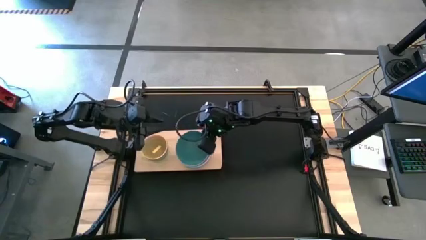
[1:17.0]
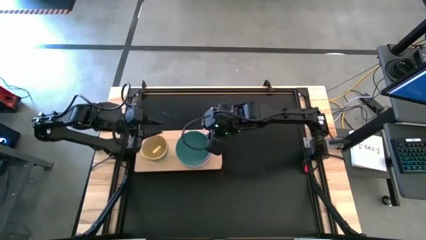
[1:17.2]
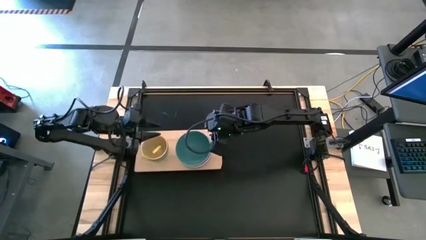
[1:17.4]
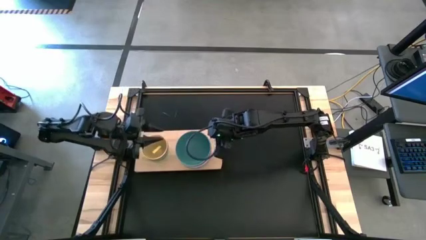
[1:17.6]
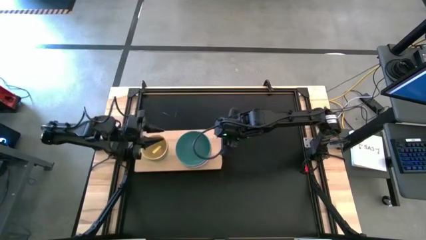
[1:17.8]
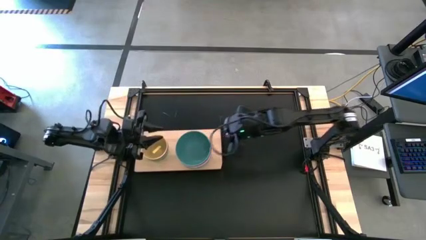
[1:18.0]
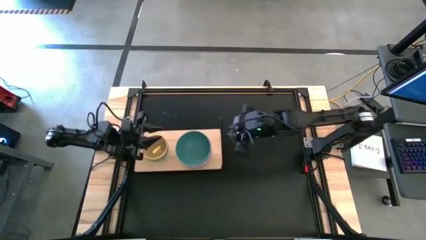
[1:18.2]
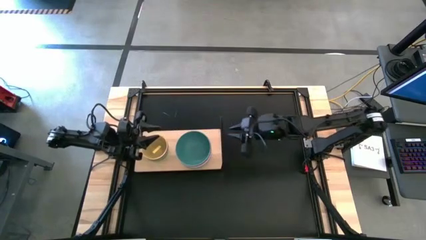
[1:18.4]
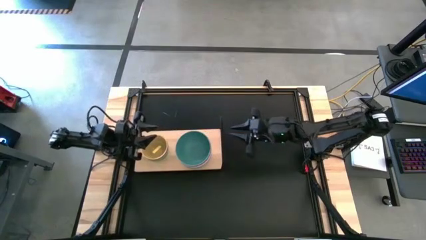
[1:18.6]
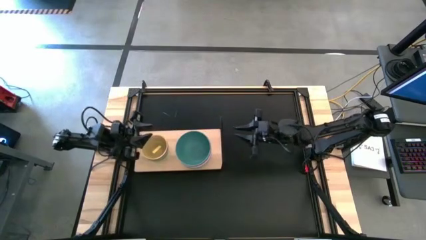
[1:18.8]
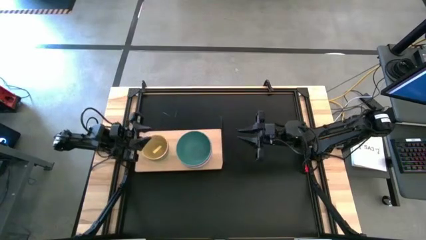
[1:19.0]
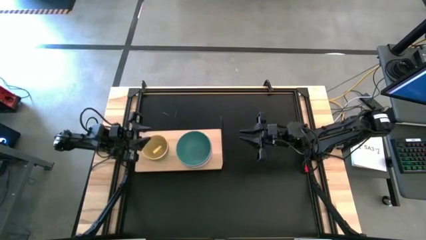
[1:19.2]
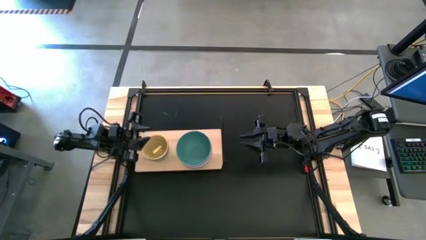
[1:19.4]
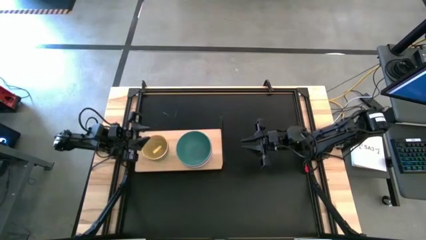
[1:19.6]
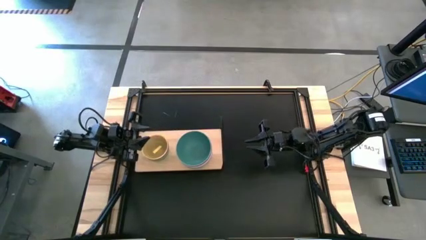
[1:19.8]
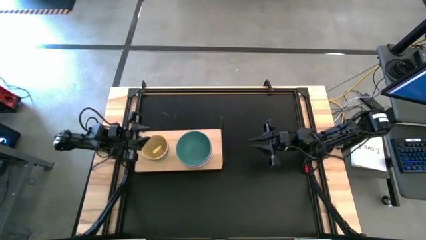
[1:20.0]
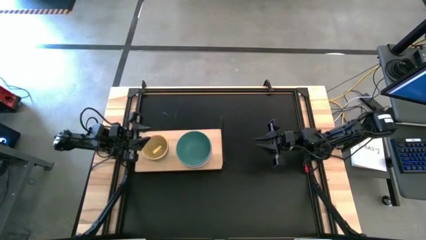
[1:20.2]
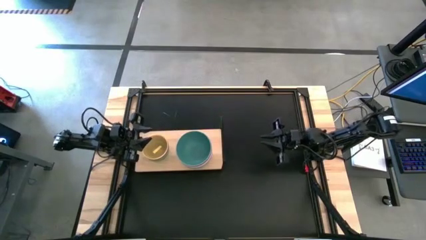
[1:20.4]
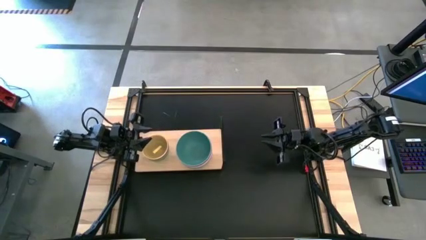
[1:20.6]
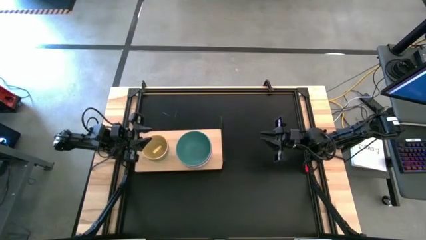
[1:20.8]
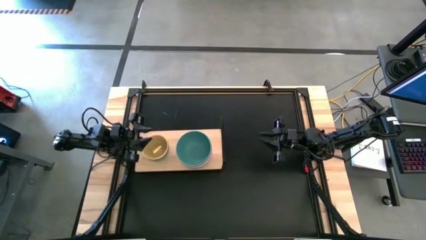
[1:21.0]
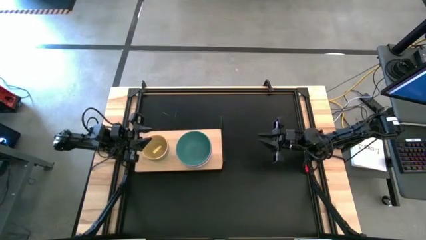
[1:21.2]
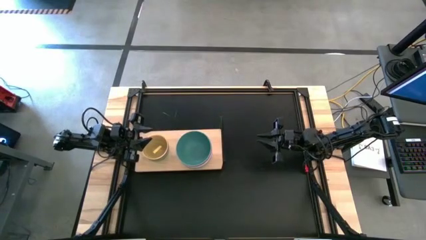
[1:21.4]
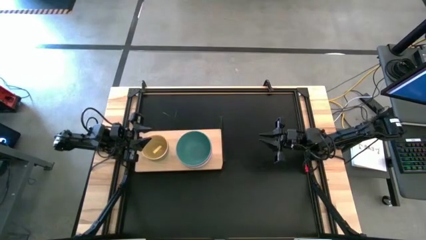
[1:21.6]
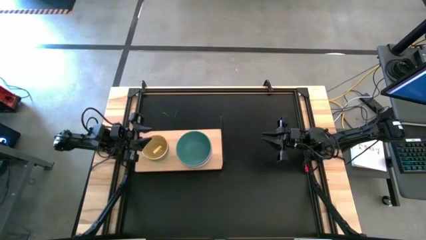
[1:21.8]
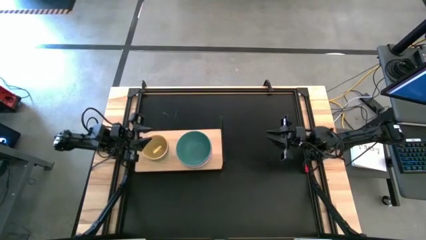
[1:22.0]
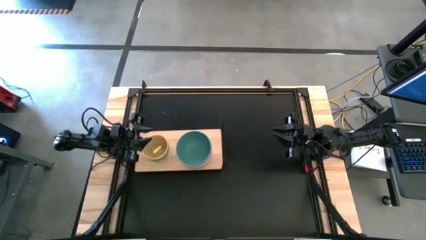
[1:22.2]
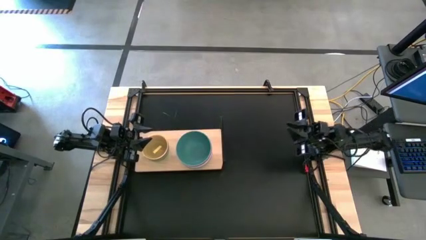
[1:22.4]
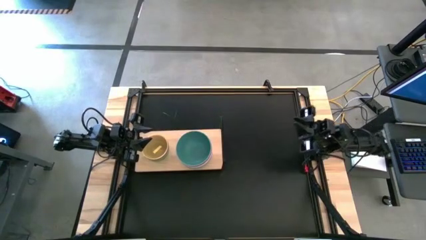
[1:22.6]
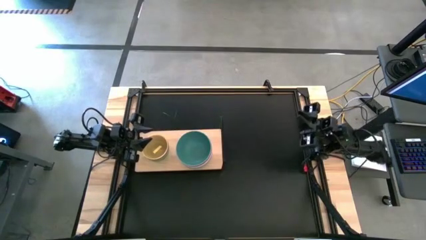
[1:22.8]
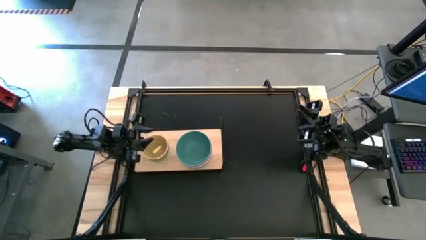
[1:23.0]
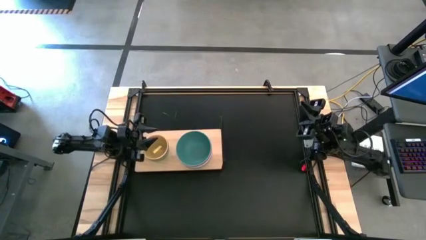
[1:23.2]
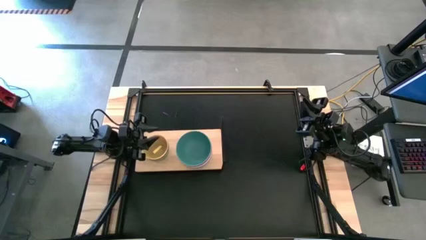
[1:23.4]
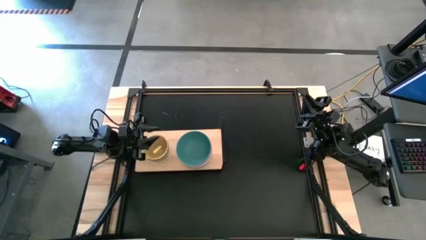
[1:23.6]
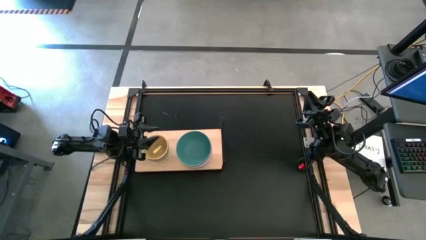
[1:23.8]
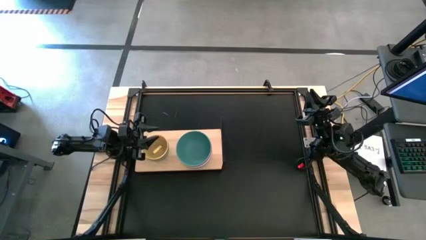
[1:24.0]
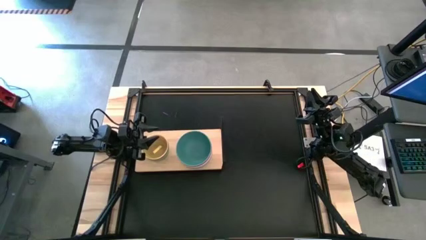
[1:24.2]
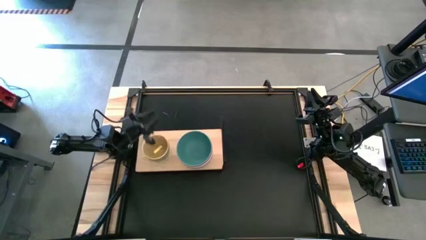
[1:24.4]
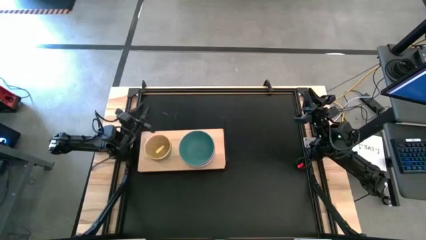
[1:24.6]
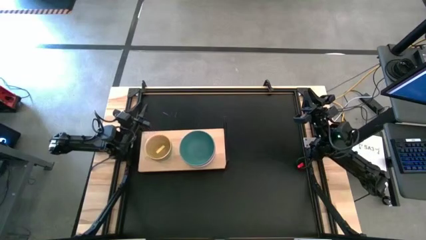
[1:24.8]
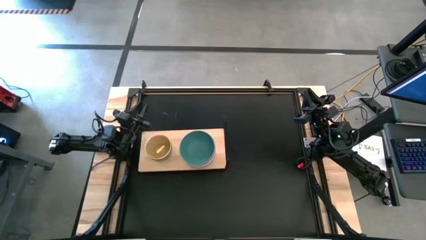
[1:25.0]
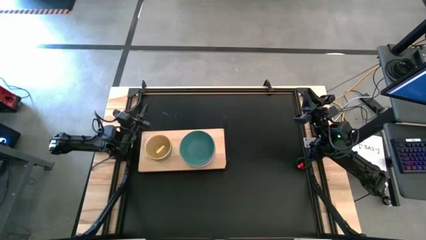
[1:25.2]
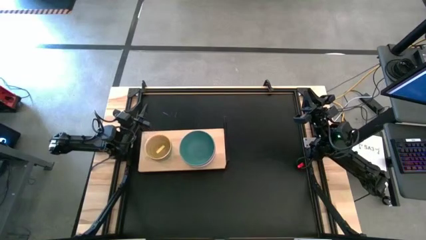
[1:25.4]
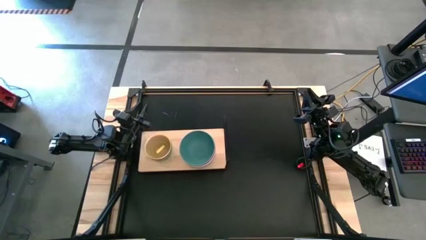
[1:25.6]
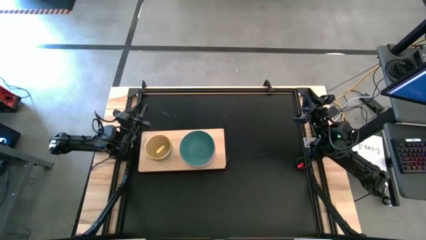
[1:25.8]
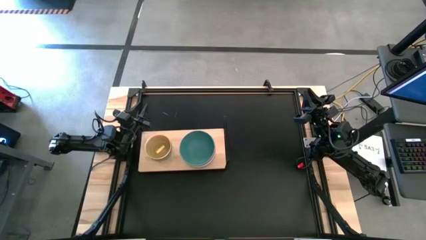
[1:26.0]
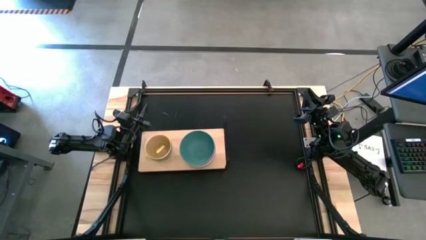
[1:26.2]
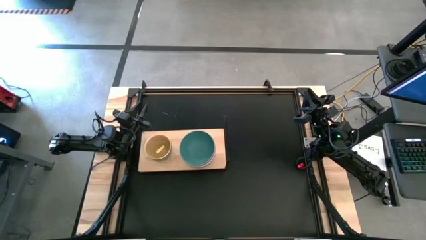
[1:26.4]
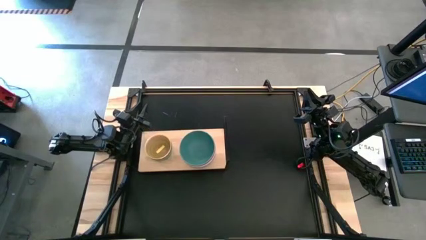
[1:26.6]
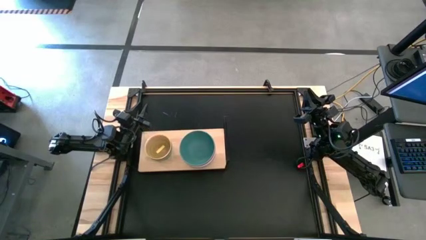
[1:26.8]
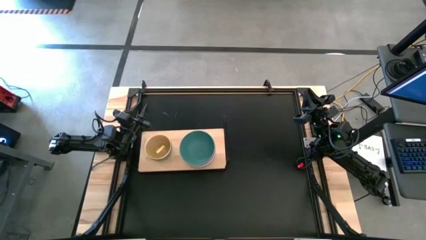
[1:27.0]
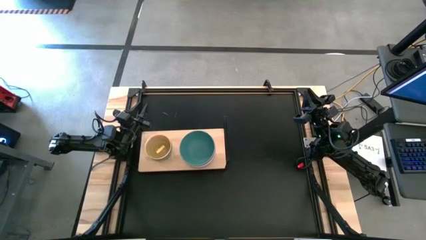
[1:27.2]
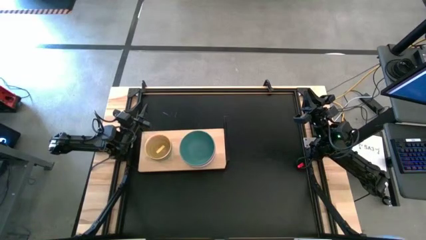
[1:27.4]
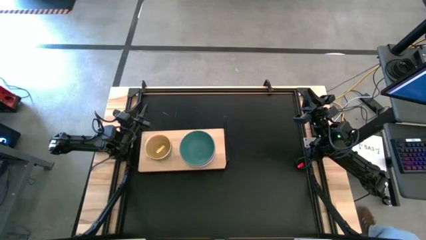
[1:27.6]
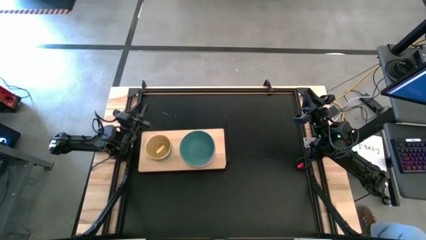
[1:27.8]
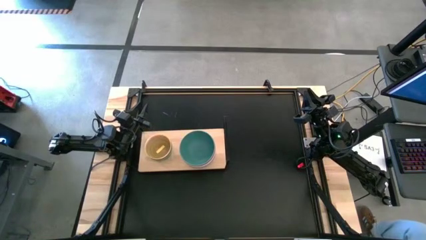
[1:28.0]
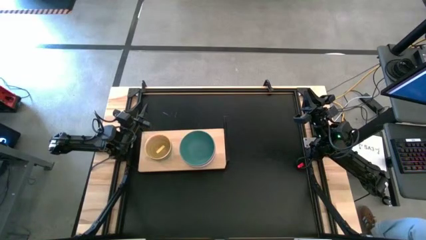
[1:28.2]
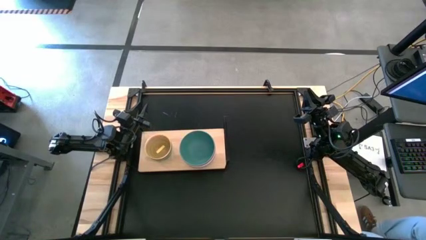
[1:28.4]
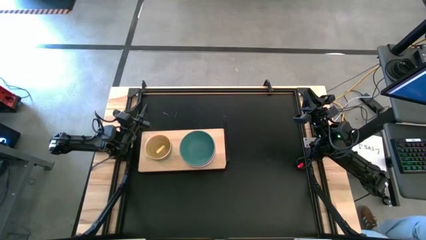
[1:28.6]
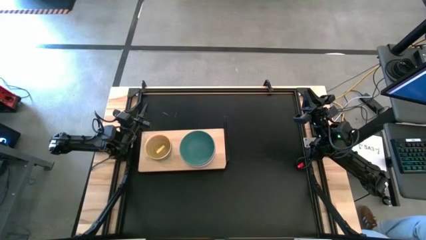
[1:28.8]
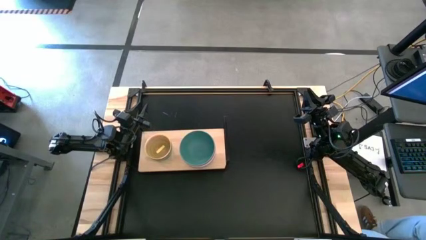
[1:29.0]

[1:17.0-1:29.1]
Task: Place and stack bowls onto a shelf
Return to Home Position

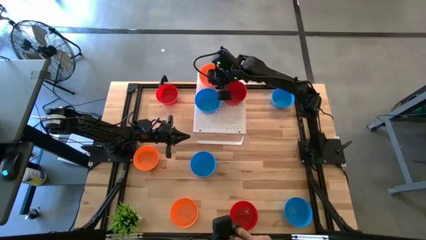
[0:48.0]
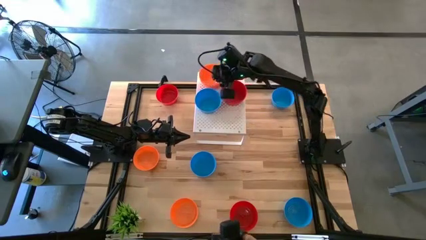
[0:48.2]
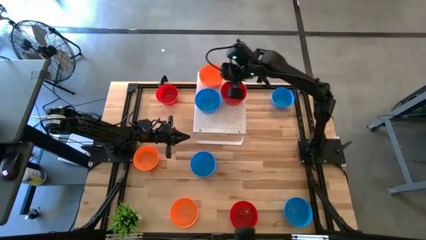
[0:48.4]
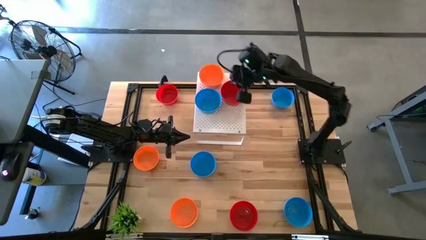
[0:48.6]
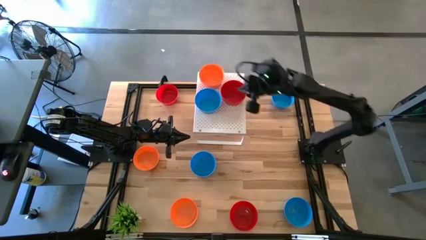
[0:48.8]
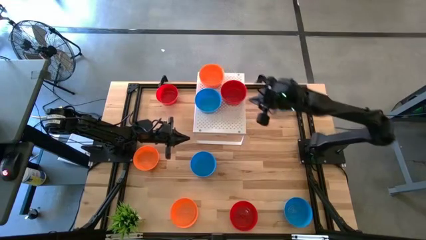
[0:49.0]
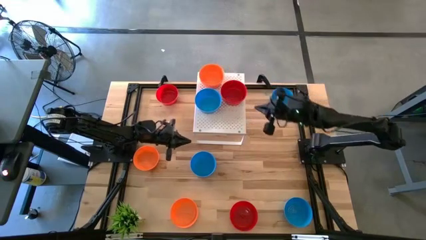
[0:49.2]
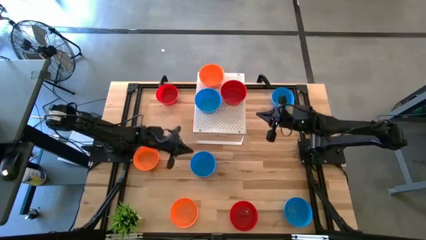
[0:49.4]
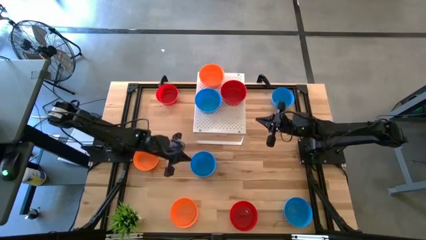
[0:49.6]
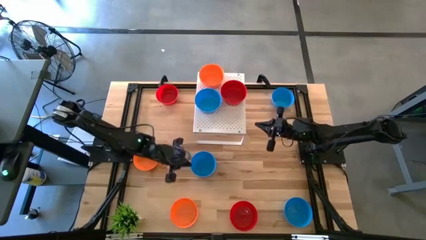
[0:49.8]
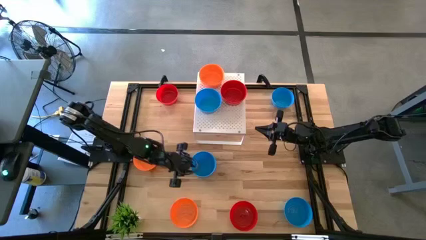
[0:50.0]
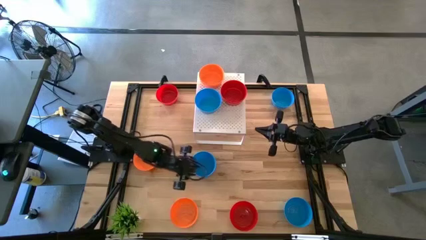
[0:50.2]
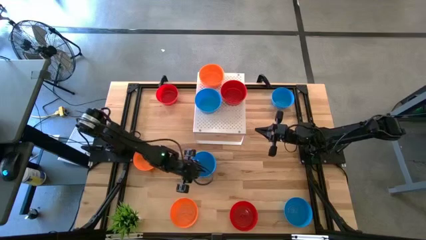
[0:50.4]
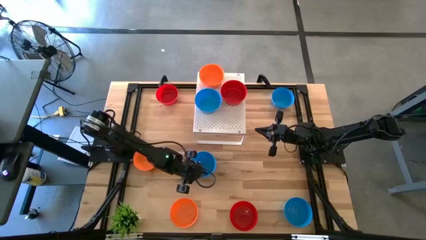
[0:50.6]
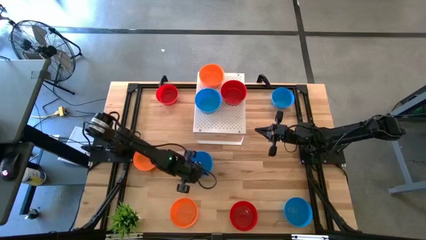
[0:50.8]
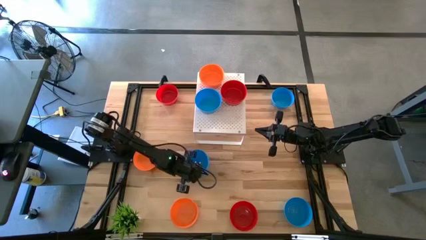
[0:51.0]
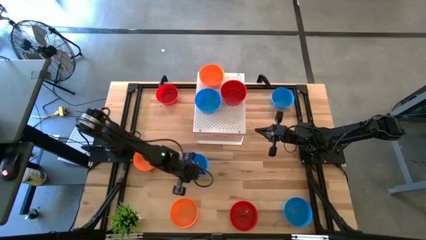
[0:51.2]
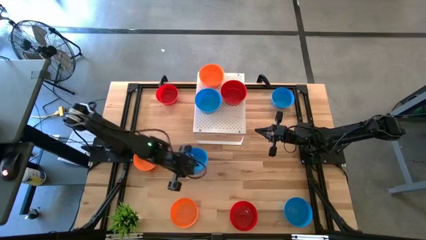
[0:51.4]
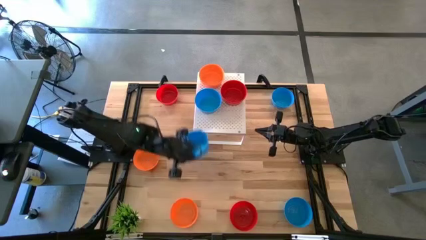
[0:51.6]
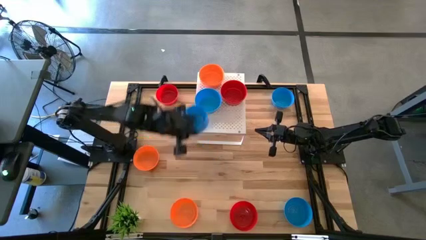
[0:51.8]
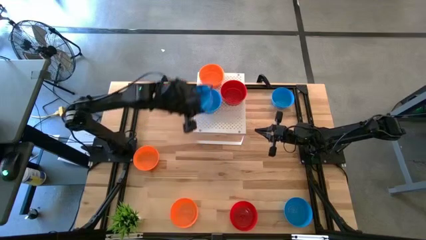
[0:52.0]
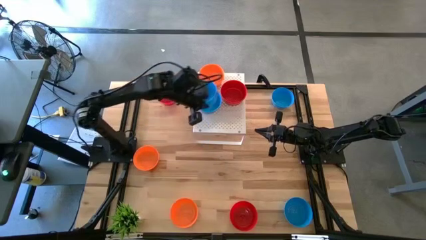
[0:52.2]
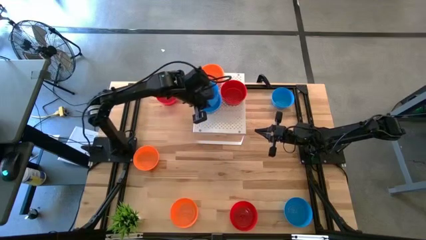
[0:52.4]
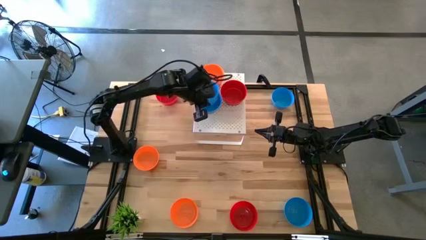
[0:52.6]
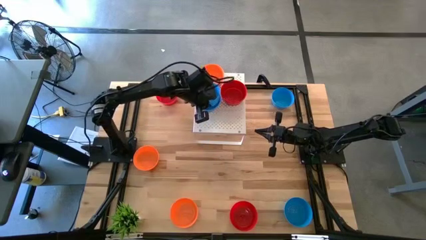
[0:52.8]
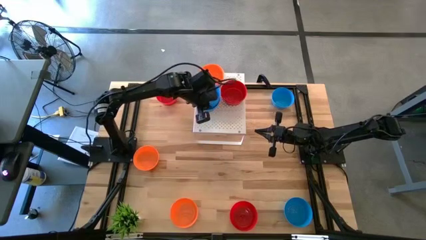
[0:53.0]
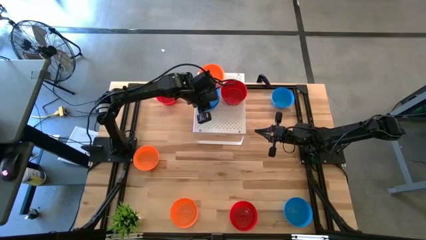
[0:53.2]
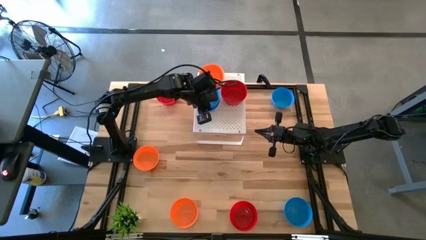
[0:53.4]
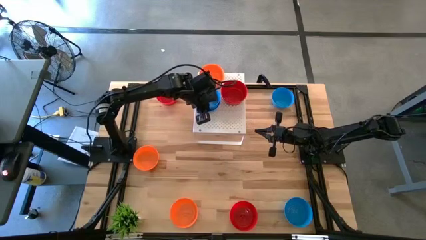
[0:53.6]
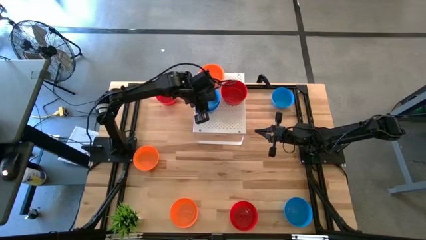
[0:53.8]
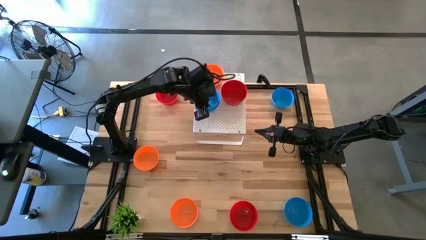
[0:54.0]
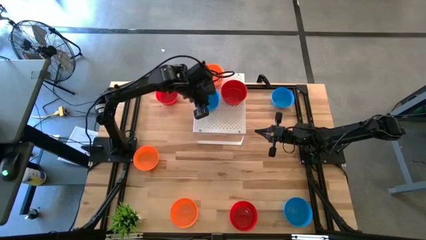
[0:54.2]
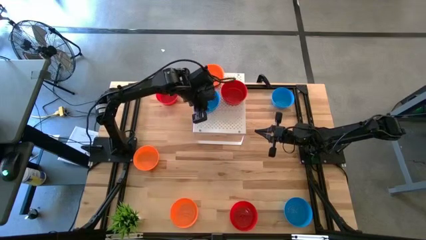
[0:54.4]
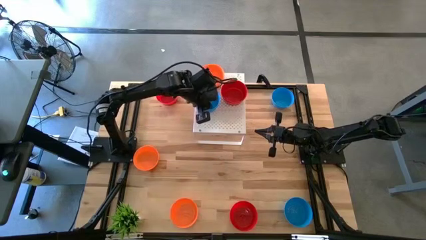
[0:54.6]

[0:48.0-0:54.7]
Task: Pick & Place Mini bowls
Stack the blue bowl on top of the blue bowl on the shelf
